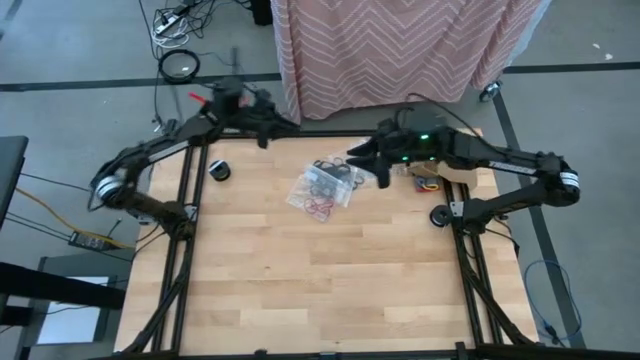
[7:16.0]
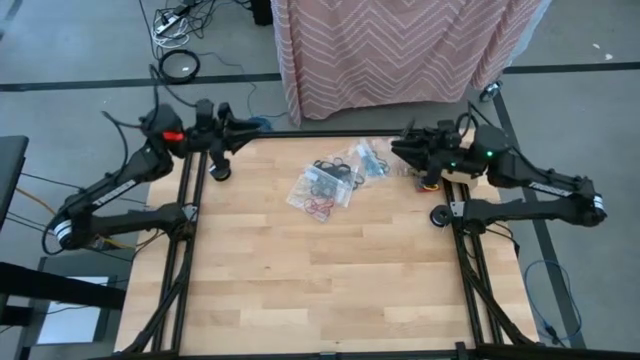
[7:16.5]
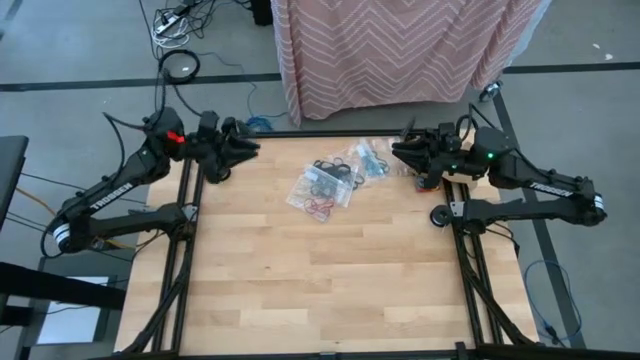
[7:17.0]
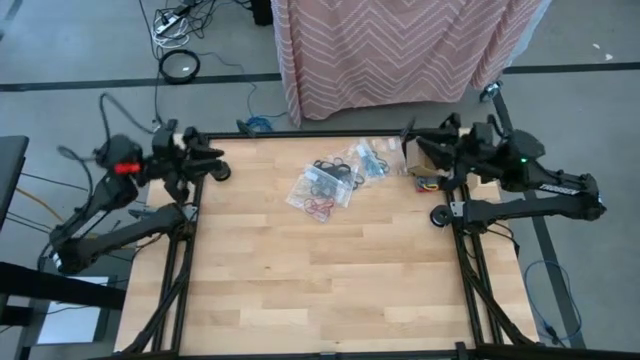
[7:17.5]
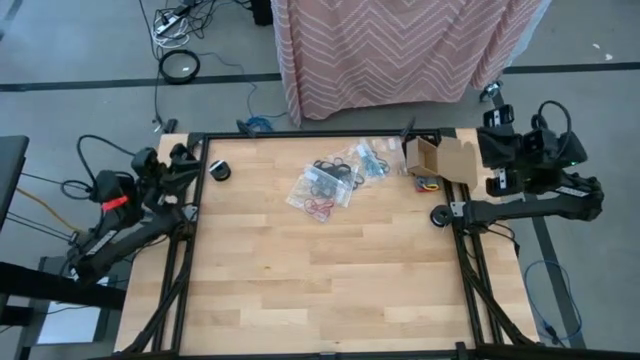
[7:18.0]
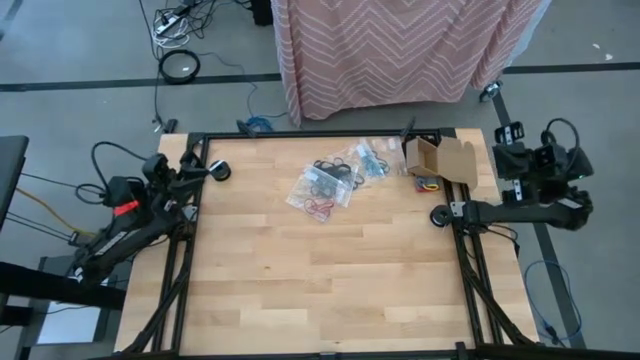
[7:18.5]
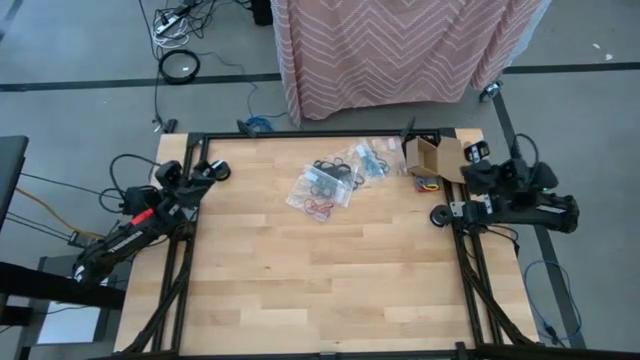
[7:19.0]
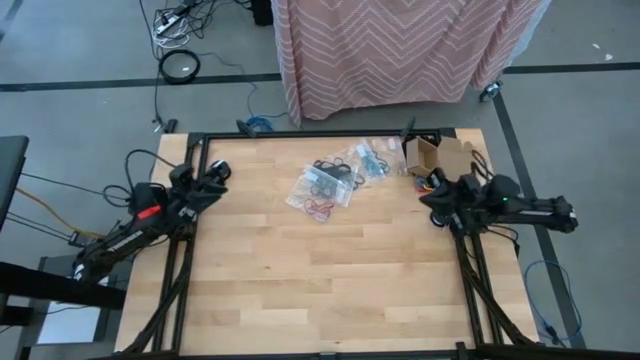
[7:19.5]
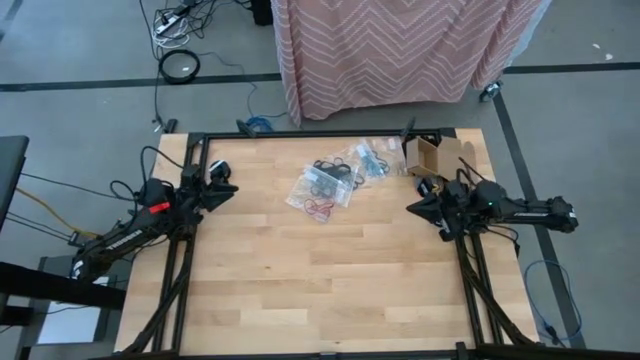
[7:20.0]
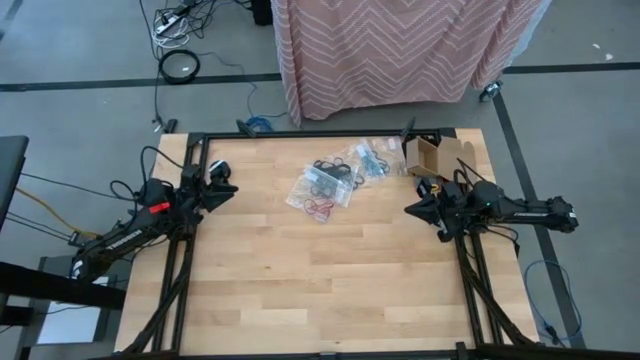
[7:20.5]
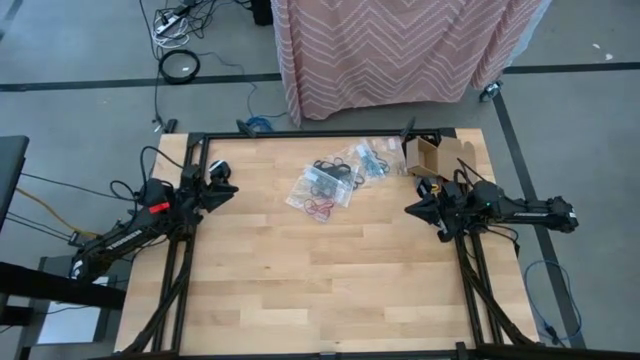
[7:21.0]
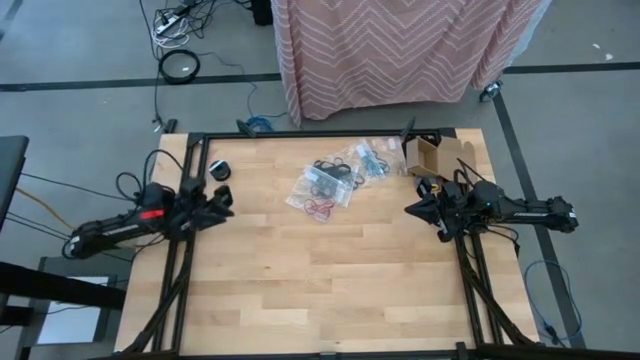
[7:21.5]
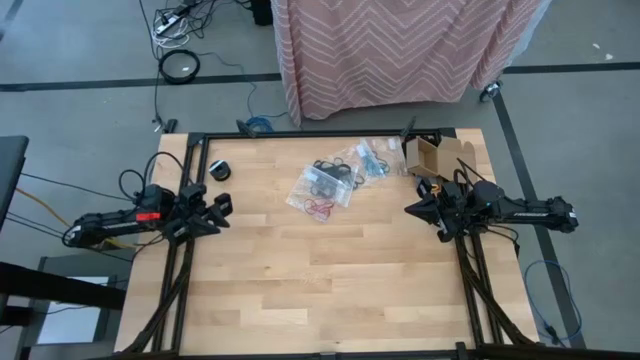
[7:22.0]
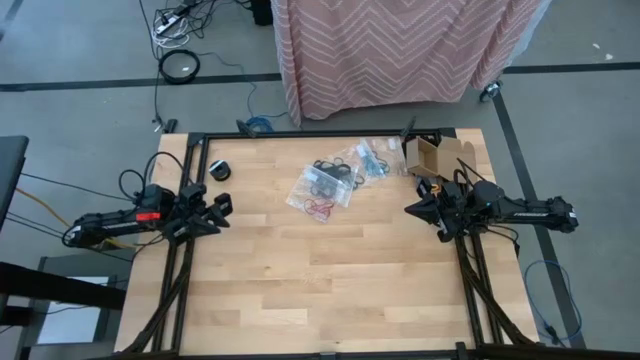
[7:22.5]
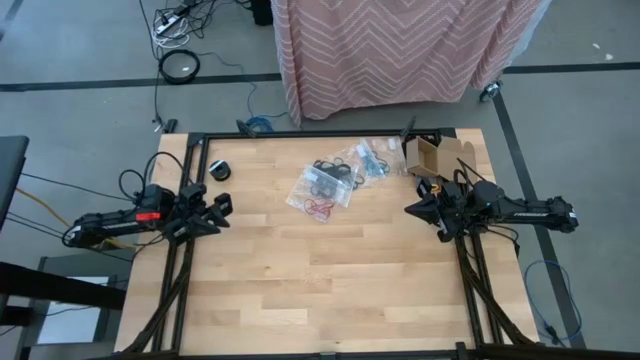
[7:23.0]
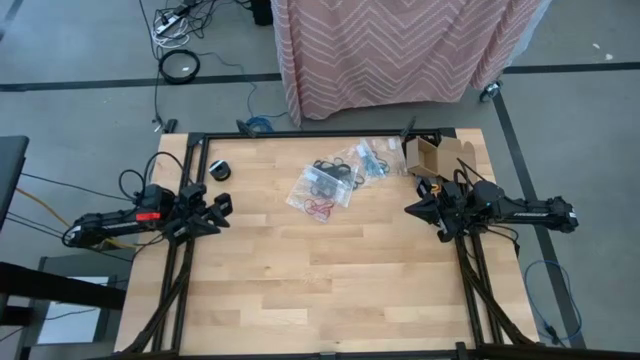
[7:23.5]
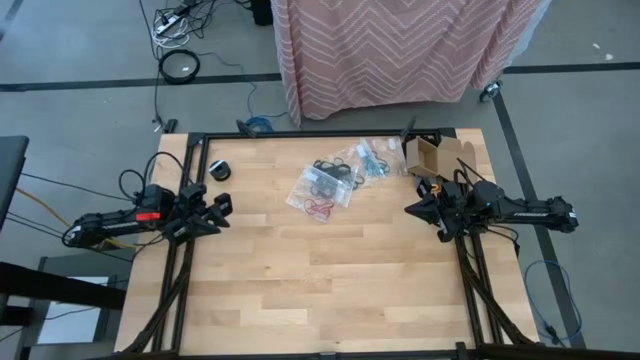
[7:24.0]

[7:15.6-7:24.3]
Task: Sort rubber bands
Return to Home Position

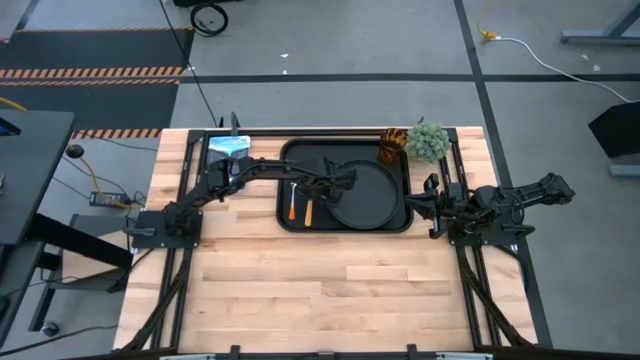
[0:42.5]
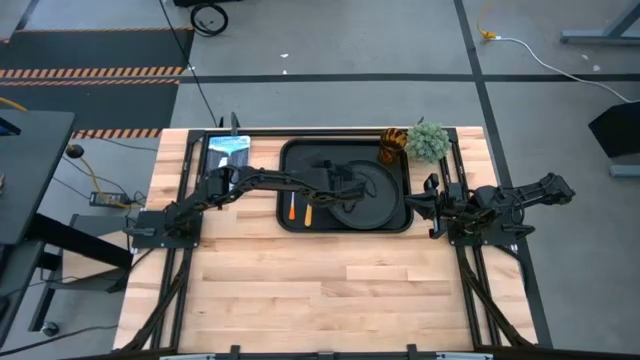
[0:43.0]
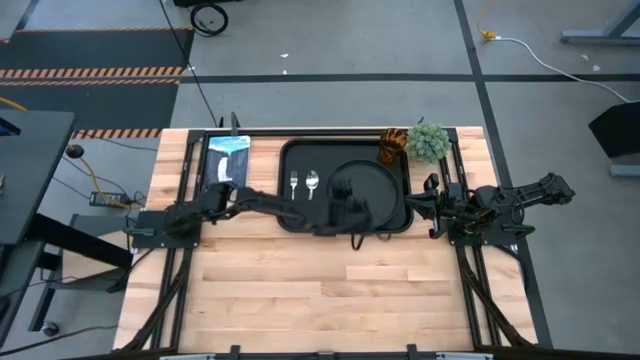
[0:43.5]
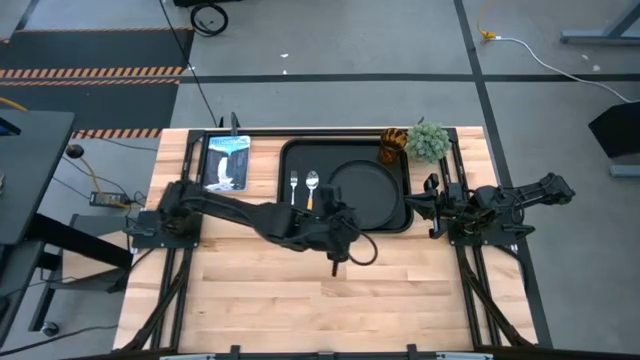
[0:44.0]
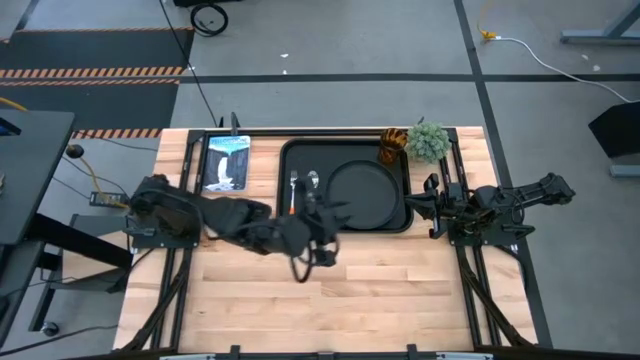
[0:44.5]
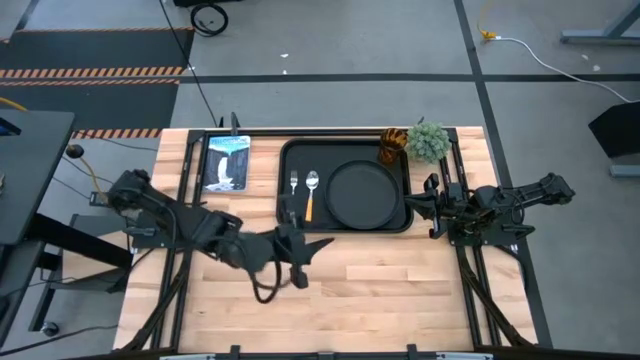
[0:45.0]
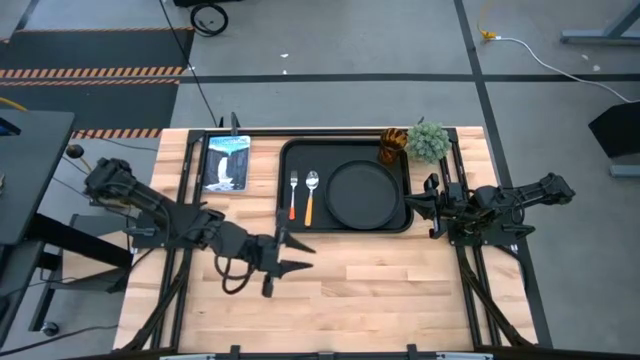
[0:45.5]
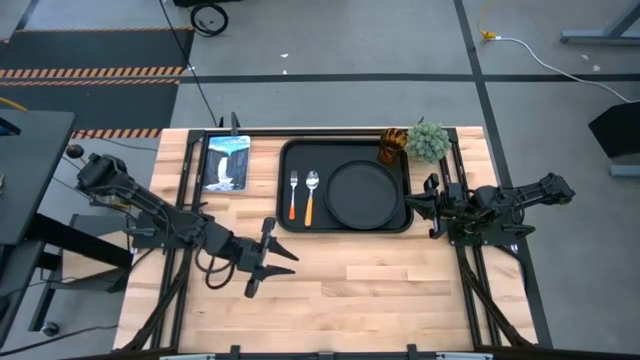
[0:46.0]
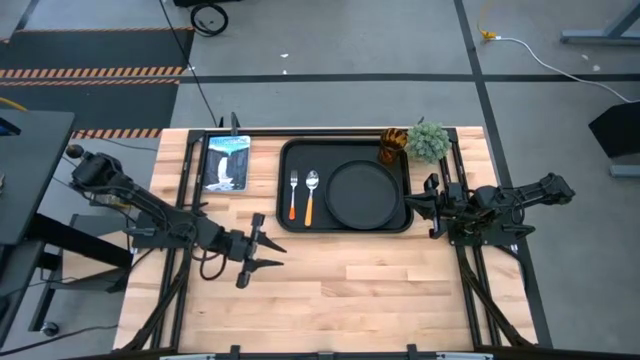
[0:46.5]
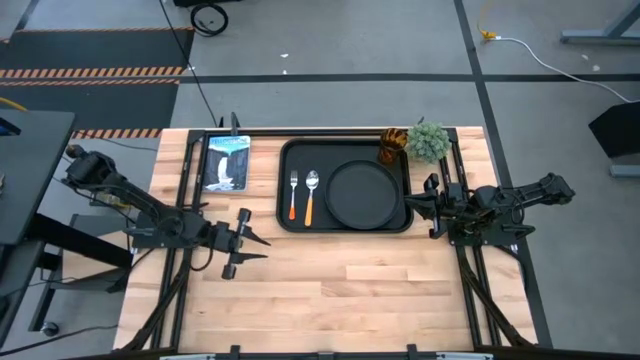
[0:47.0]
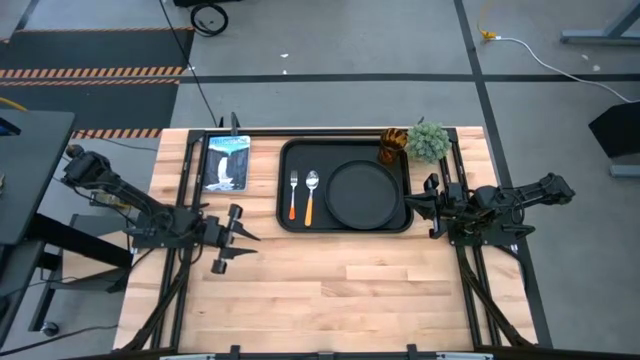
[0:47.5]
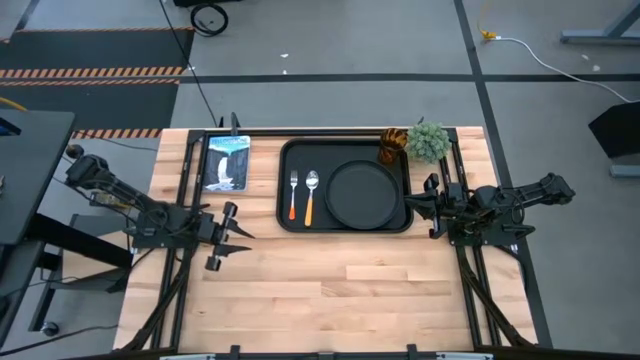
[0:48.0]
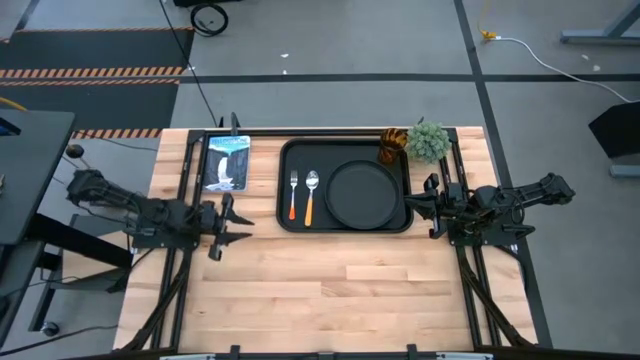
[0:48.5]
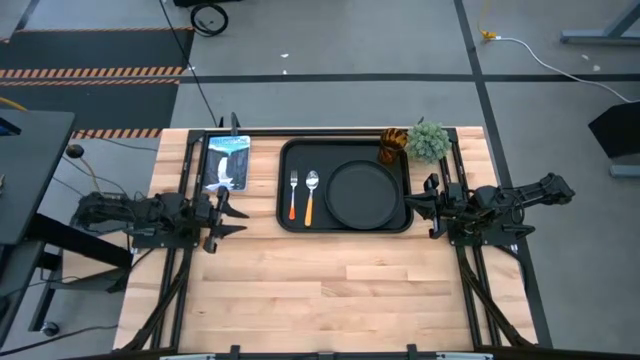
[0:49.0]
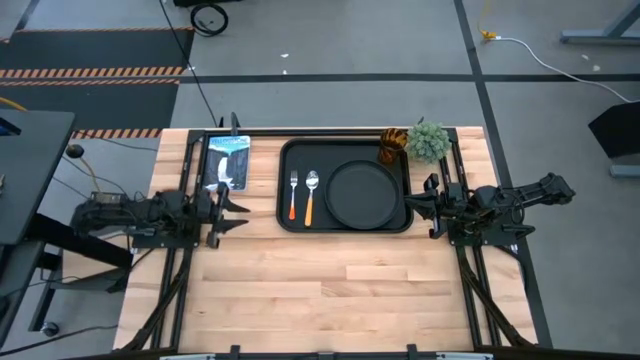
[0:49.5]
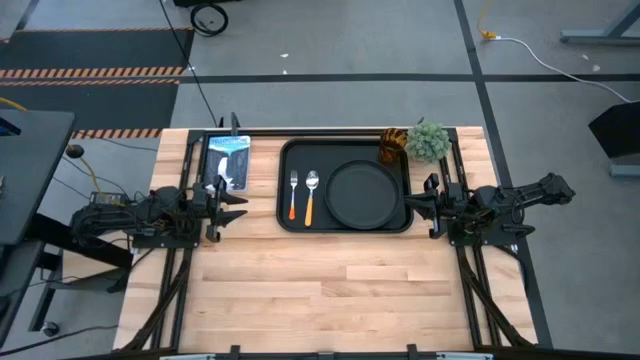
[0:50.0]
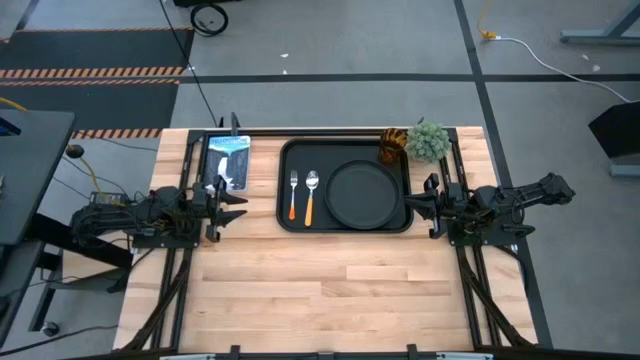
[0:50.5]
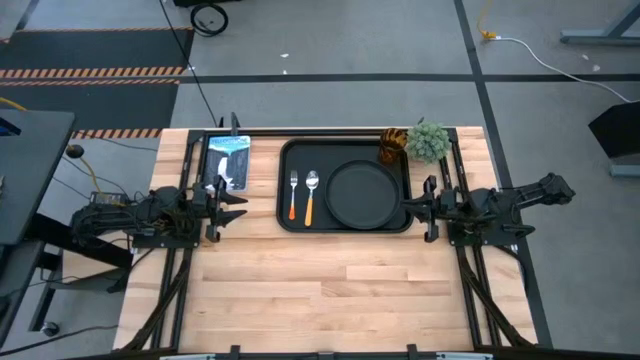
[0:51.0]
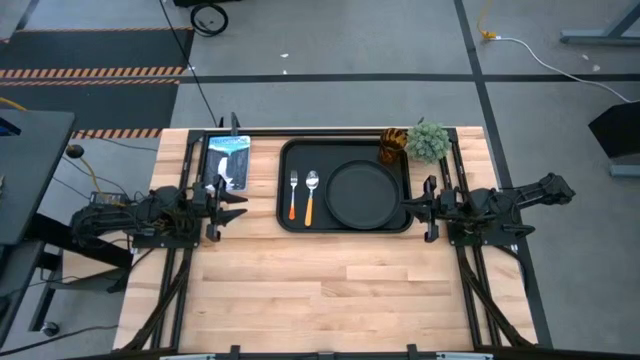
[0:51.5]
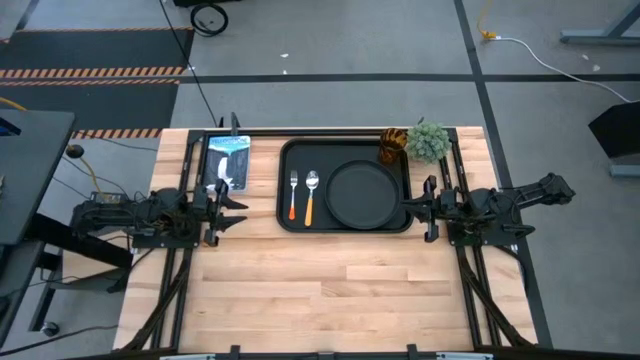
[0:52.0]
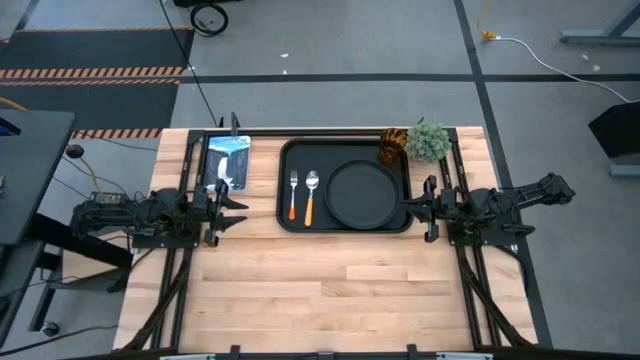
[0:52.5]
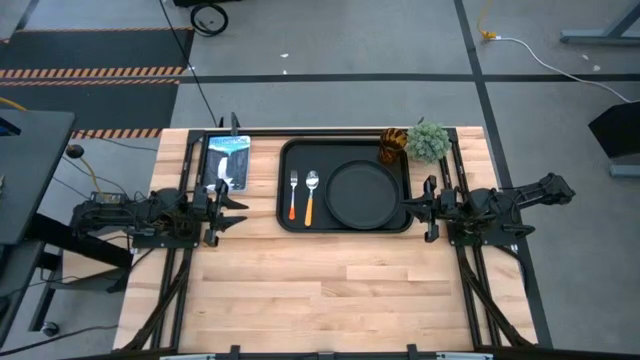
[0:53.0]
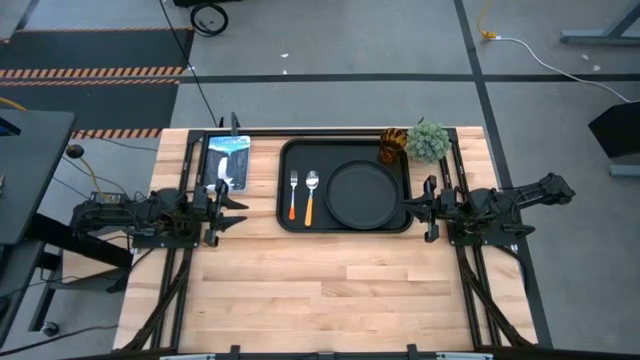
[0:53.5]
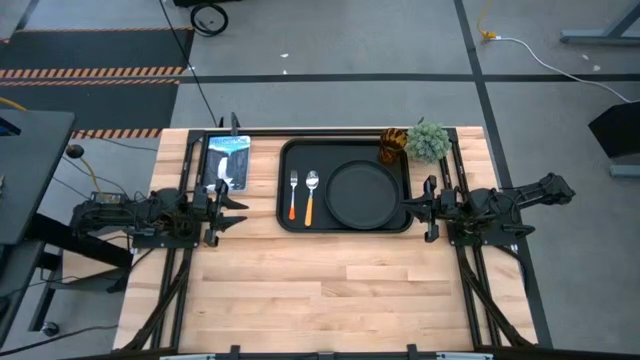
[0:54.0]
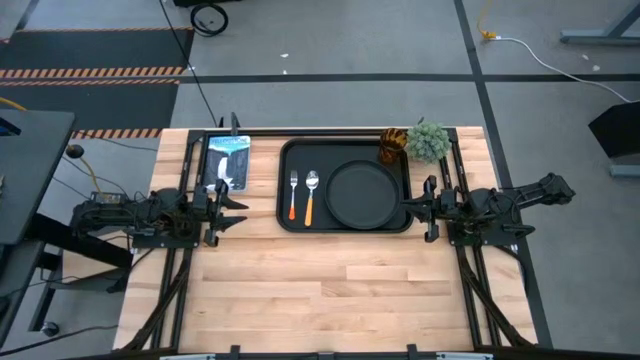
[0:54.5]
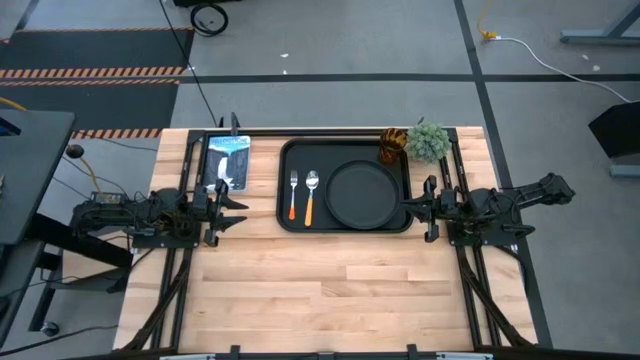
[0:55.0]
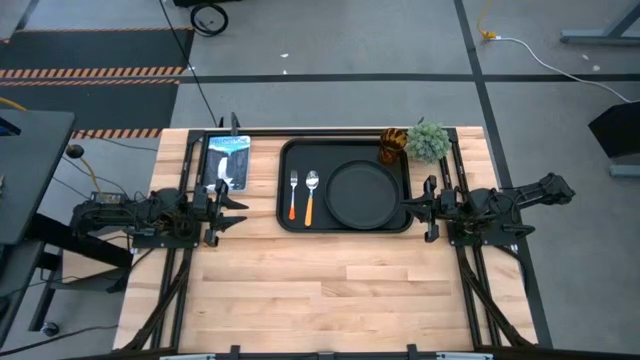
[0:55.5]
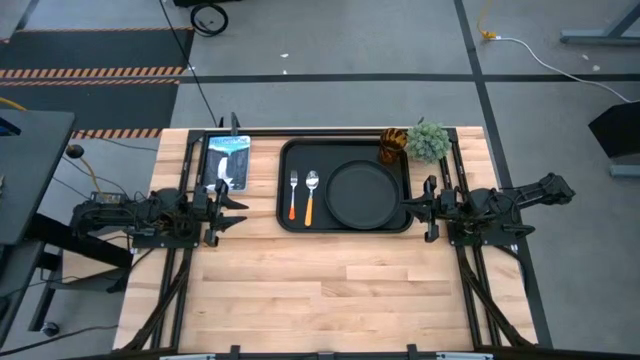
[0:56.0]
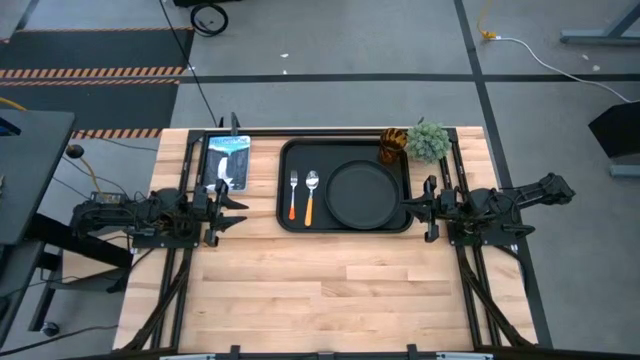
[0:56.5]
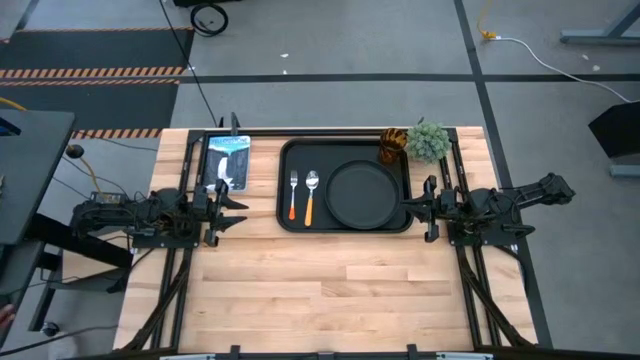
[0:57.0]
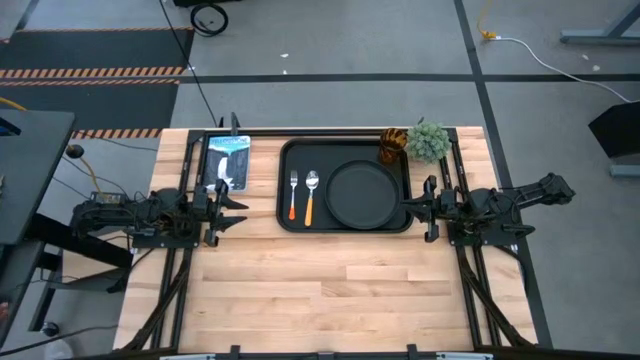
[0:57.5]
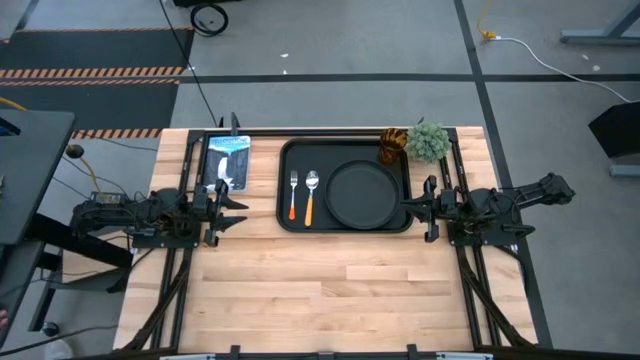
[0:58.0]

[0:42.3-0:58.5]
Task: Pick and place plate/cup/fork/spoon on tray
Return to Home Position
